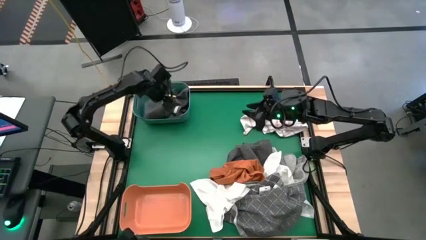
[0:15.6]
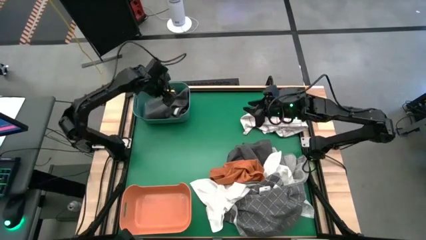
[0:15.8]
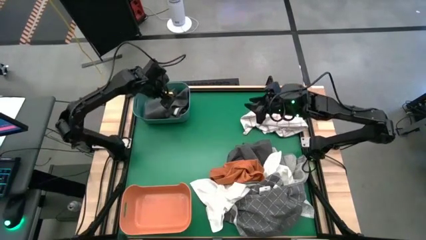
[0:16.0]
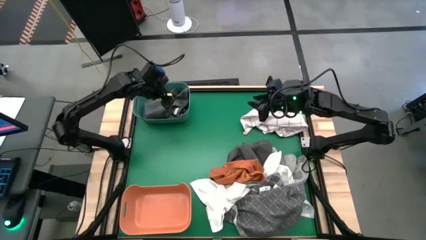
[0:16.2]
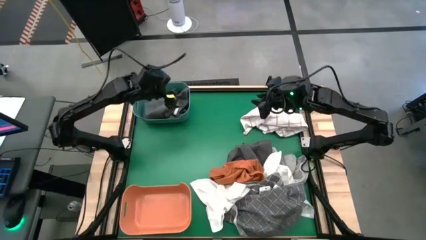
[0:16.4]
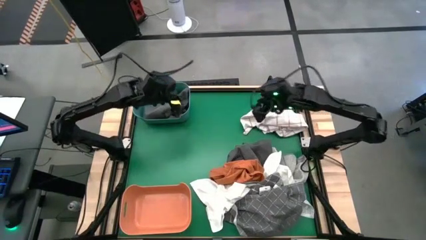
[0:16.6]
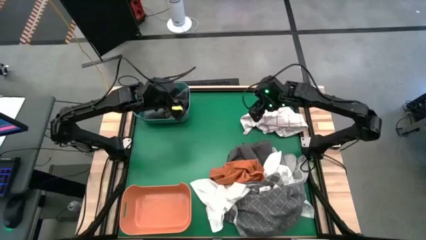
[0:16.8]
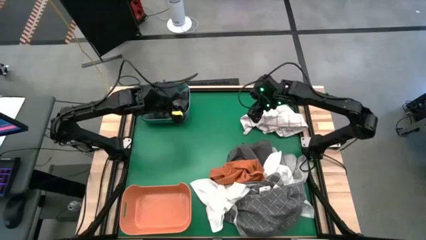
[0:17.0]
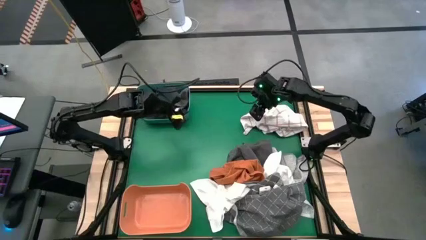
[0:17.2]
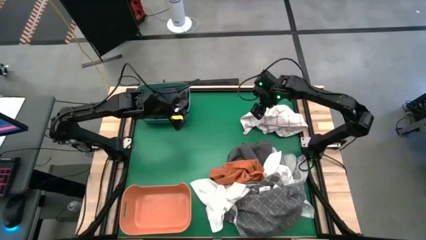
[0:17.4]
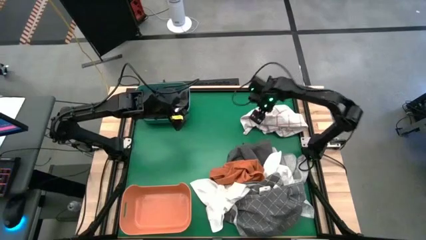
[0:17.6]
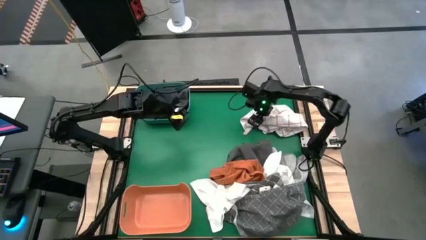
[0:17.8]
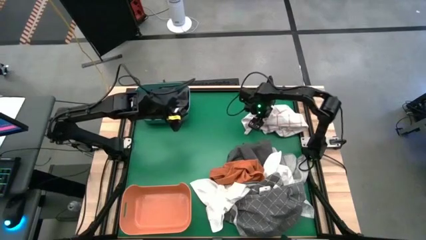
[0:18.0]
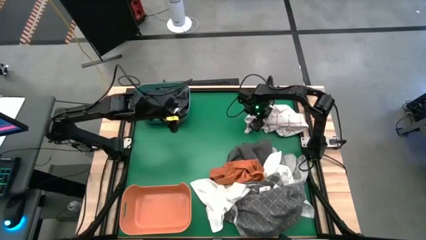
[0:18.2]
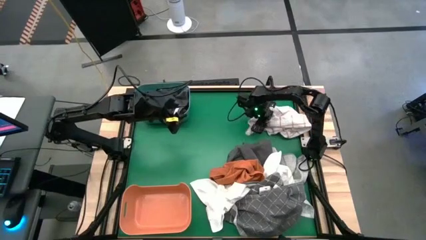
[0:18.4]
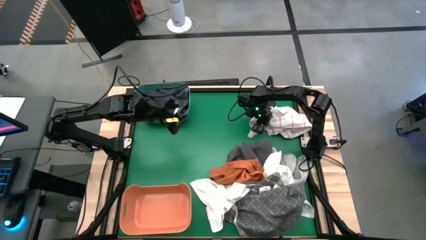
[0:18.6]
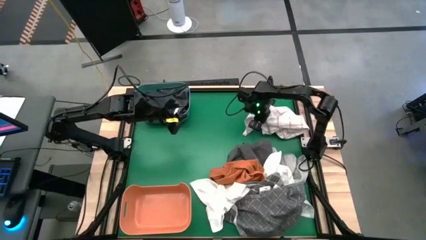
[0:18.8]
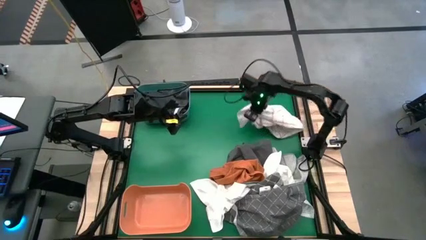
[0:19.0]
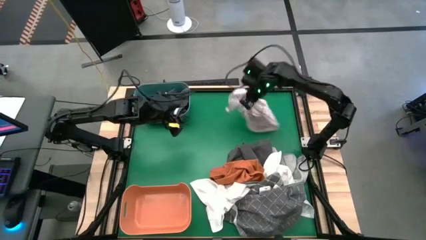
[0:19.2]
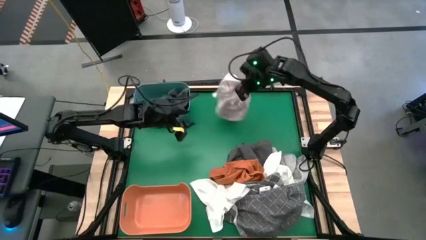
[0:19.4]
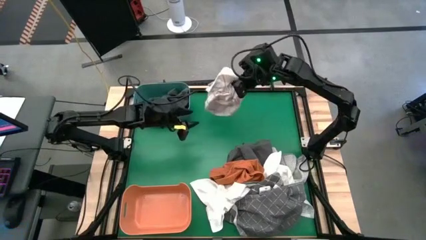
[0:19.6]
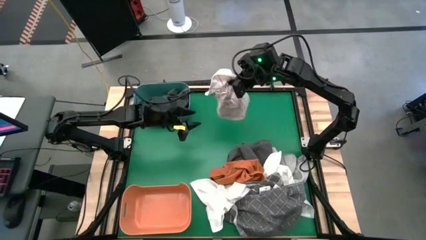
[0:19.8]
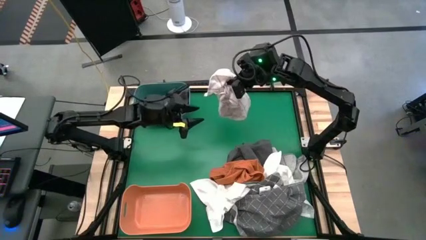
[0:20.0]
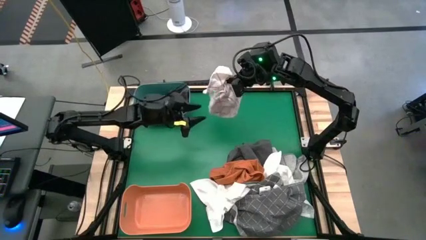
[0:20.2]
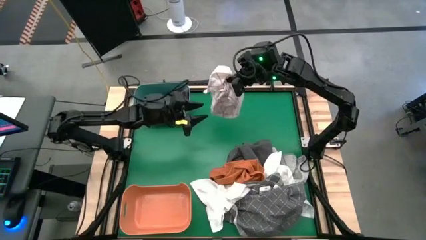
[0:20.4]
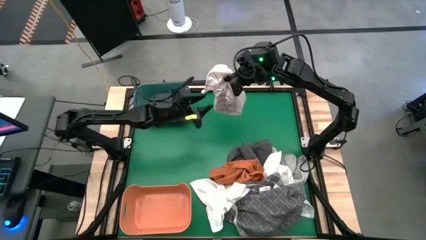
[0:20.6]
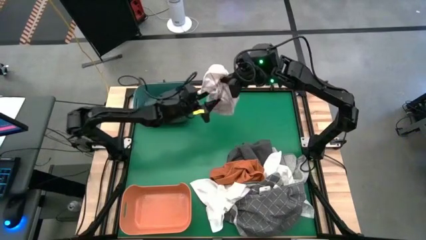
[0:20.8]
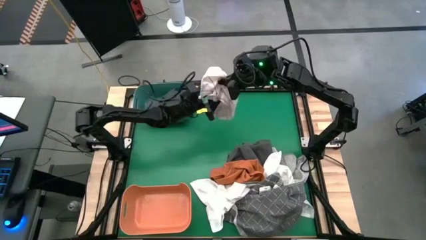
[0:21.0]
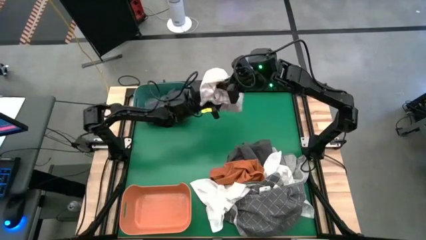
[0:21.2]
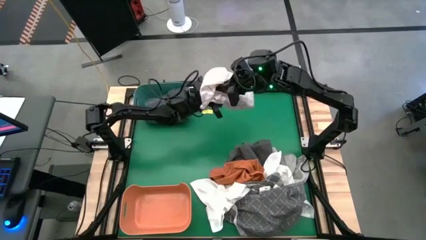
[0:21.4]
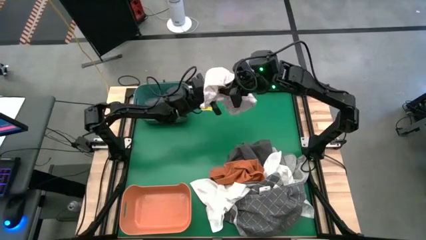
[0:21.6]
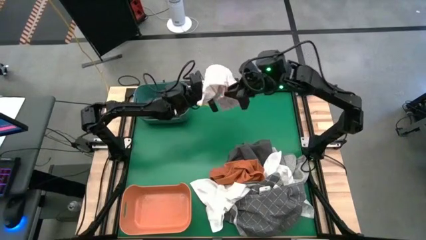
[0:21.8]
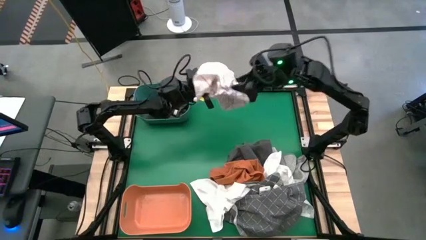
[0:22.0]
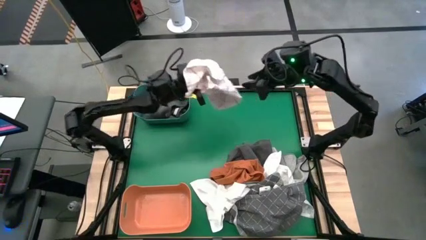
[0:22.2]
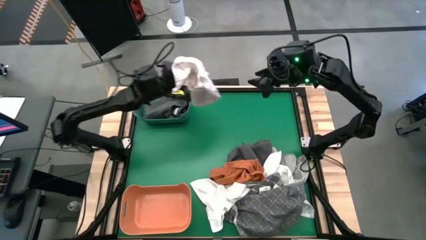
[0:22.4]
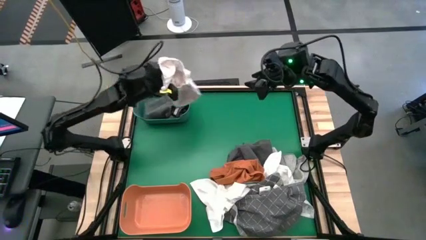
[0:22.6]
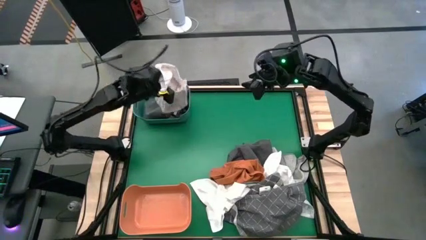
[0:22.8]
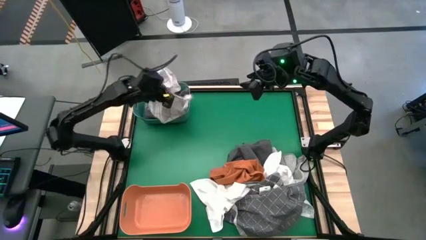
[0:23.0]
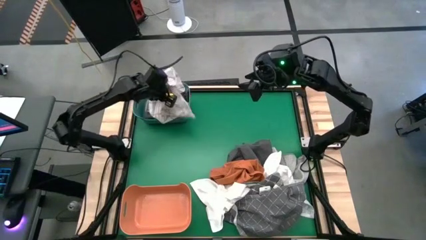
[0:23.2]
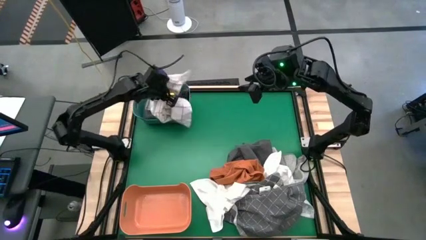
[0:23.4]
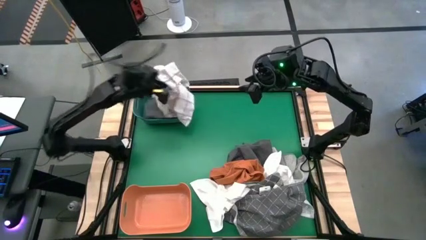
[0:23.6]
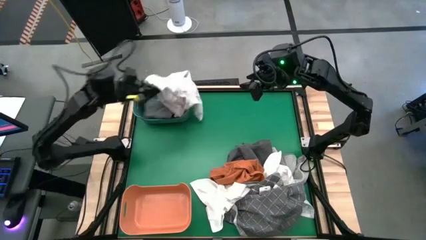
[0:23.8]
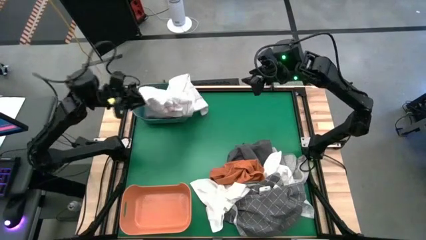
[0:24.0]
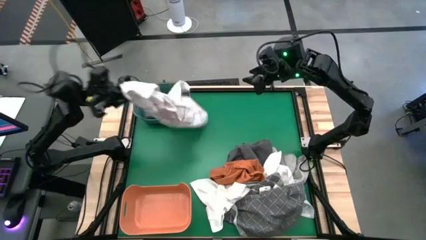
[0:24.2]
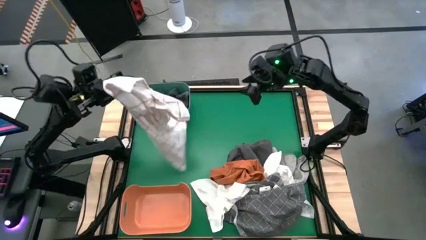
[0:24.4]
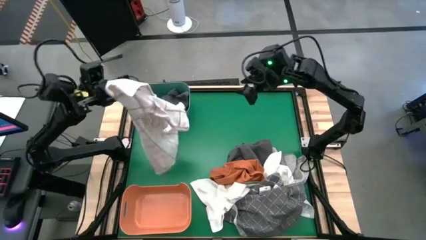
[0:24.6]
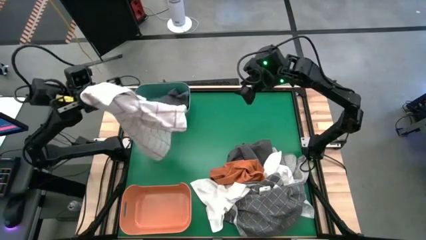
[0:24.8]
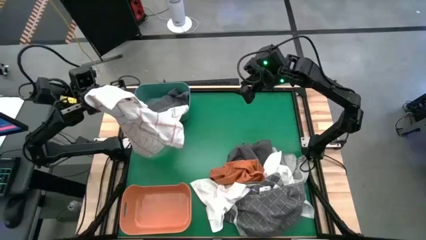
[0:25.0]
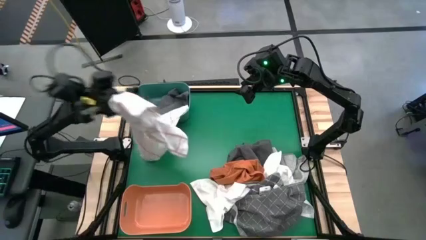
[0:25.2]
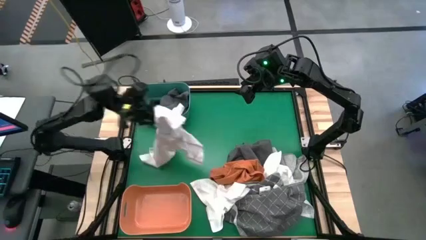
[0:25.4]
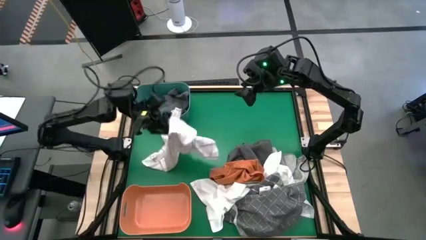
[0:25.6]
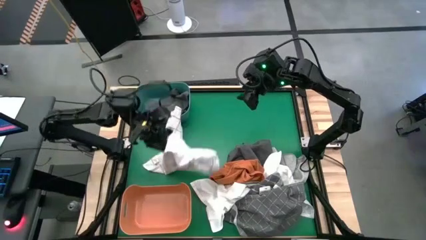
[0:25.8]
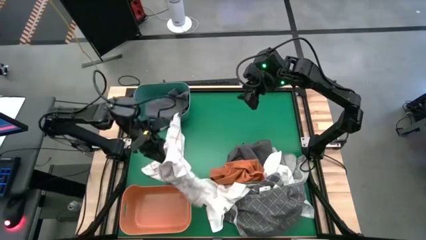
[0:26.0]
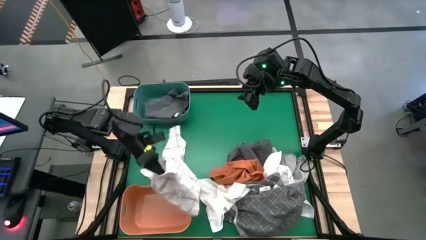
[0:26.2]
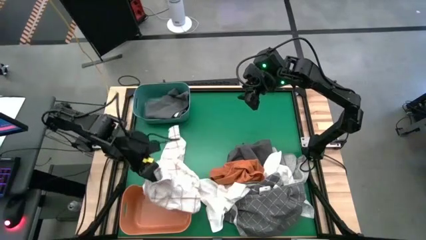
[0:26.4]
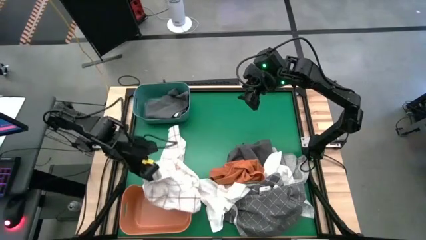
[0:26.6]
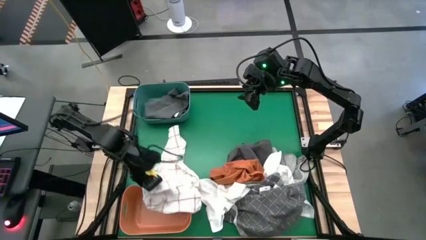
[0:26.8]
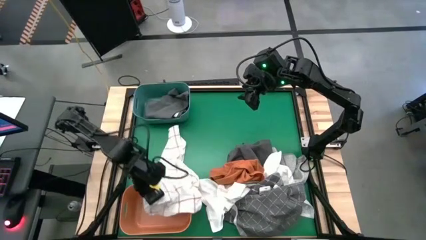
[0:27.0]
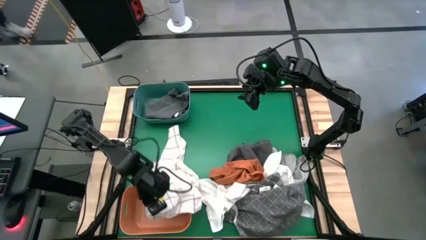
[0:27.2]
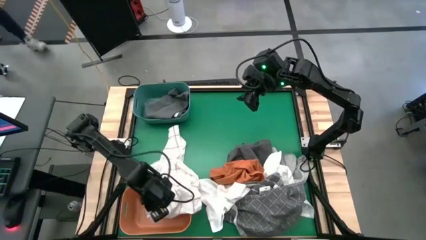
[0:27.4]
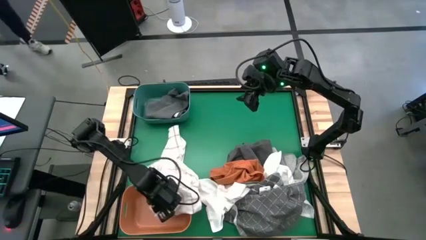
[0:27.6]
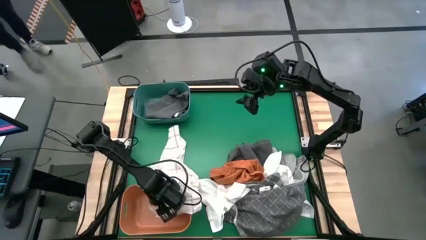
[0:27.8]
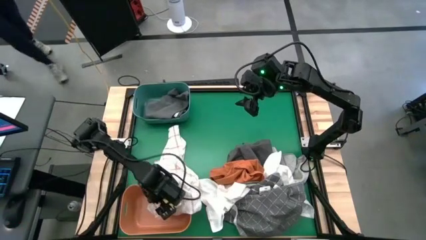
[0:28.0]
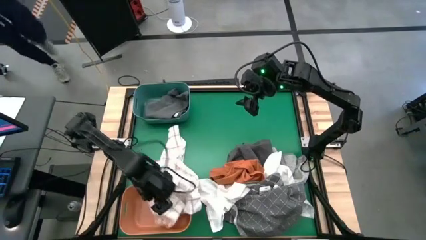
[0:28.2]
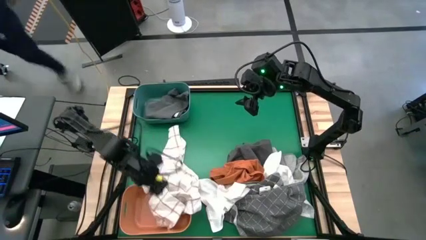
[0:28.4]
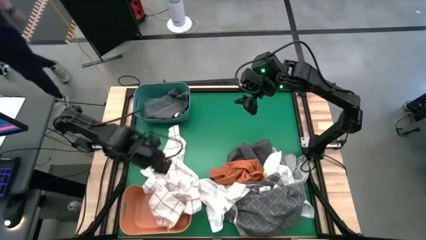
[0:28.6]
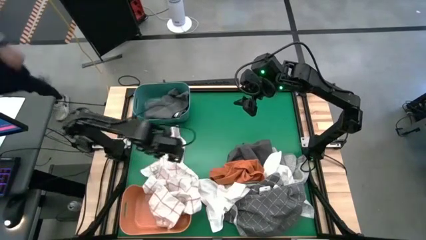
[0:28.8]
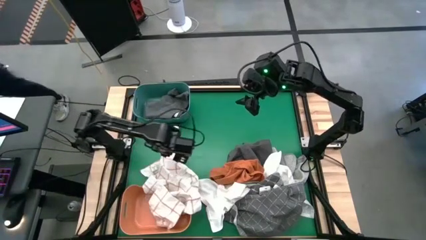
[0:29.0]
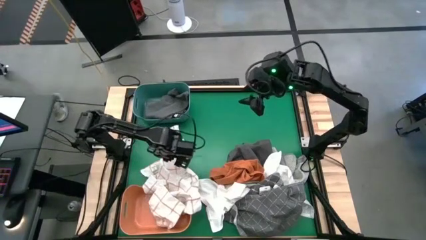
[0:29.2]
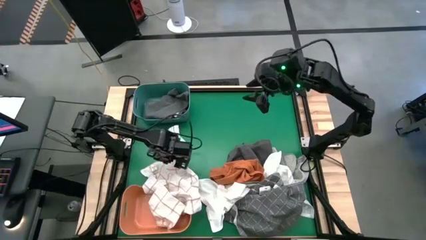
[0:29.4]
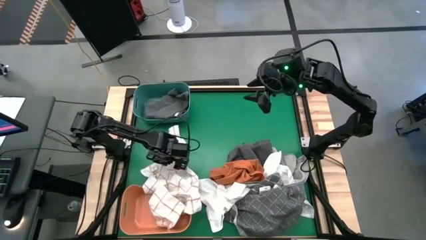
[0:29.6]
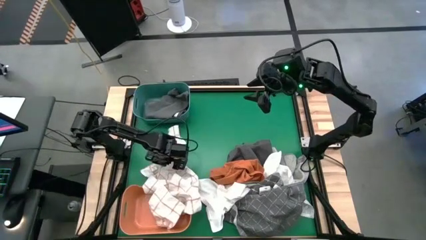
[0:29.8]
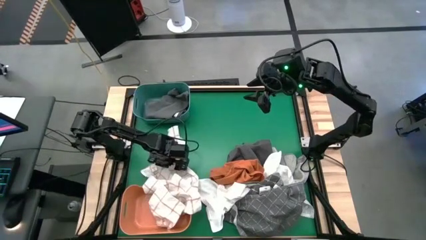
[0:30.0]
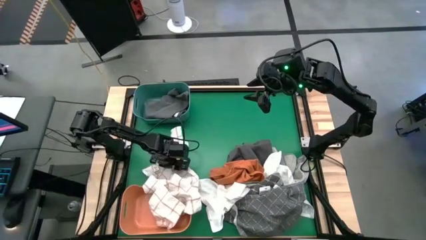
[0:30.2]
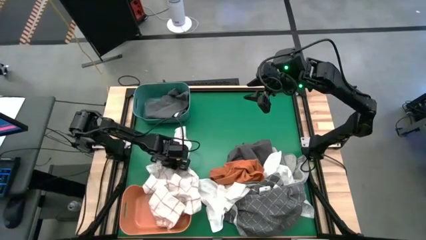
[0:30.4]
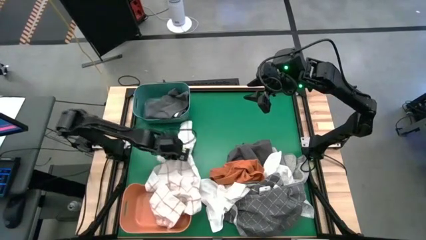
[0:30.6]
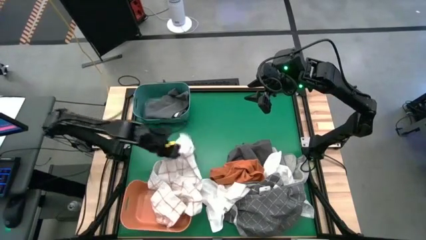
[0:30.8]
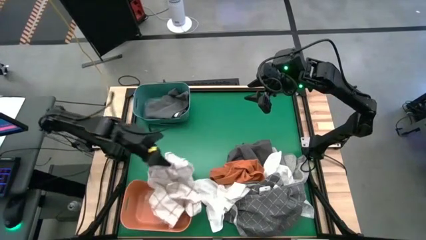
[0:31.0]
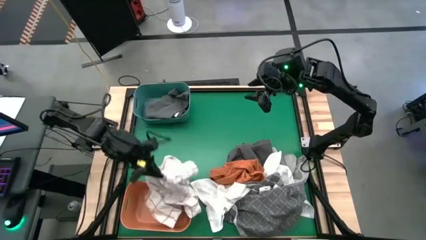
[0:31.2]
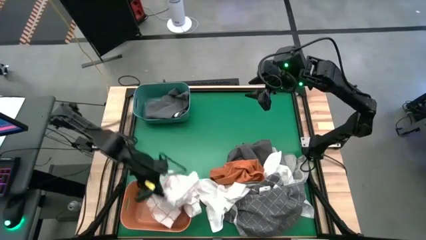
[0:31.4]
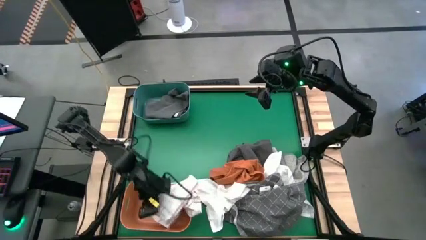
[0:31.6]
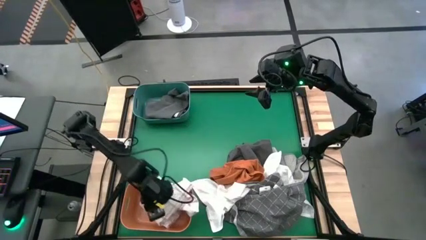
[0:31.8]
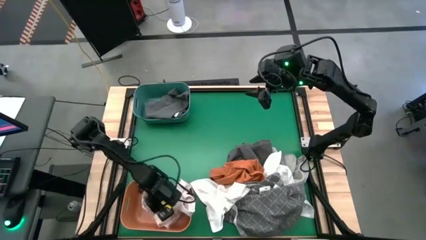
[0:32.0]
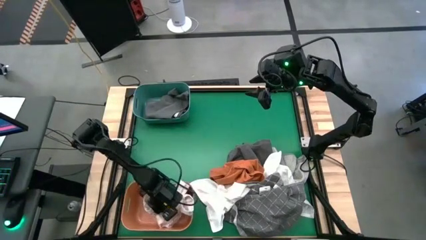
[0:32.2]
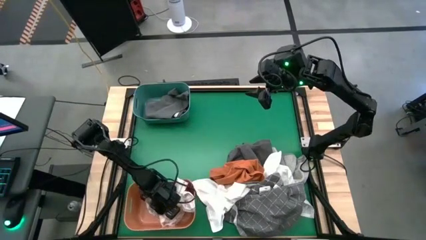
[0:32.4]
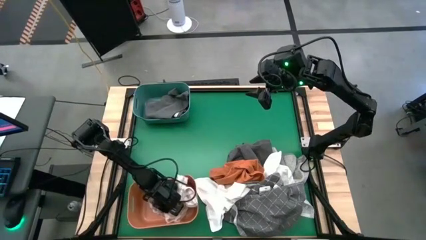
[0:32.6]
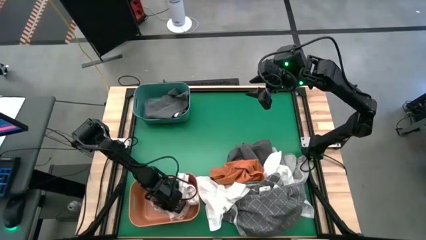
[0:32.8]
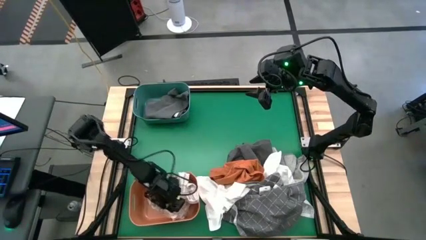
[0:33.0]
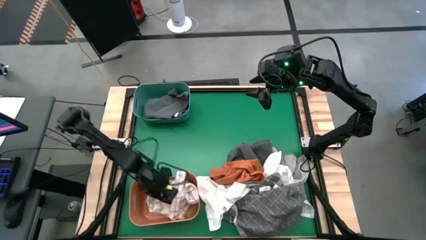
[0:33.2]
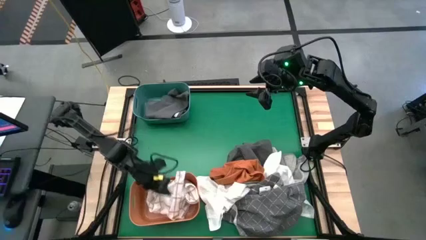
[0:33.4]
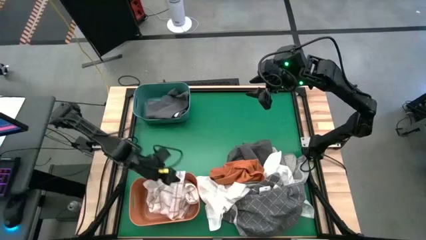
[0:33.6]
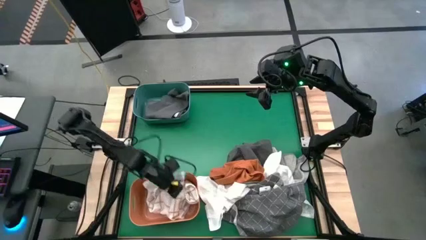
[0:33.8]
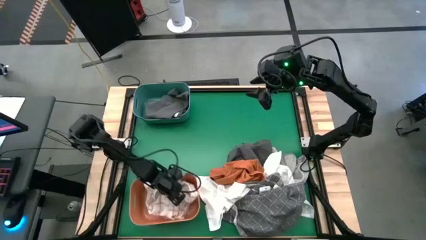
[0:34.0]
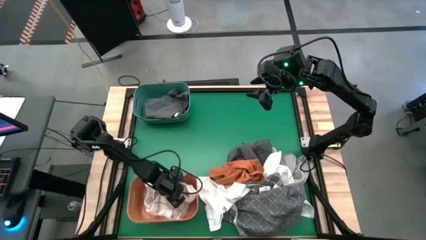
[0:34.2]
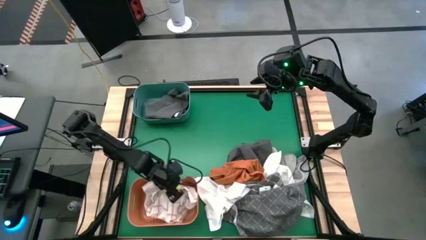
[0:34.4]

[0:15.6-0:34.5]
Task: Sort microfiber towel by color & place in baskets
Put the white and orange microfiber towel into the orange bin
